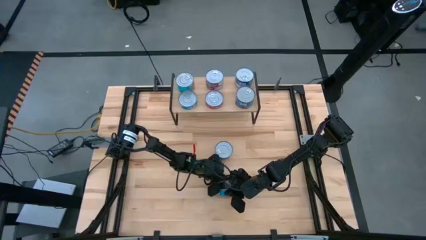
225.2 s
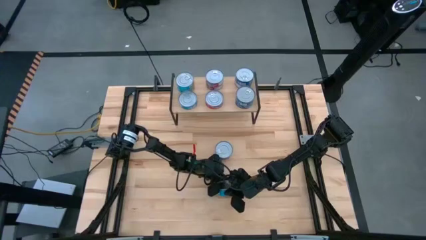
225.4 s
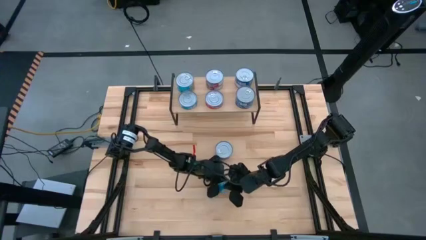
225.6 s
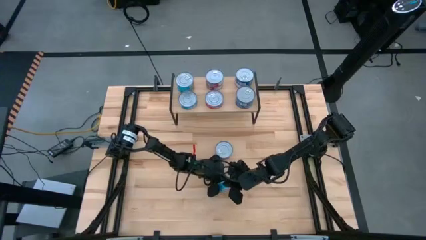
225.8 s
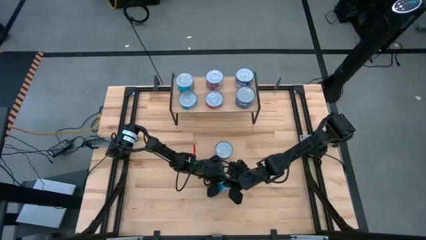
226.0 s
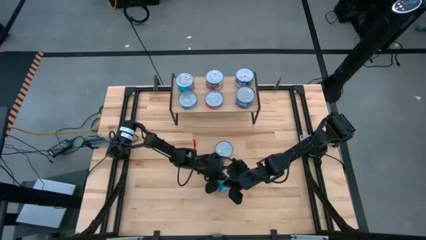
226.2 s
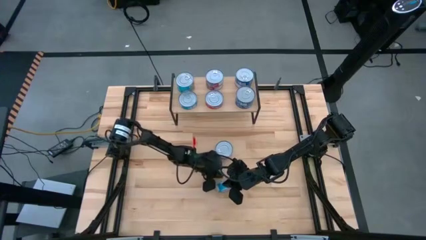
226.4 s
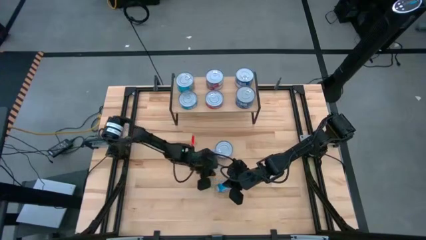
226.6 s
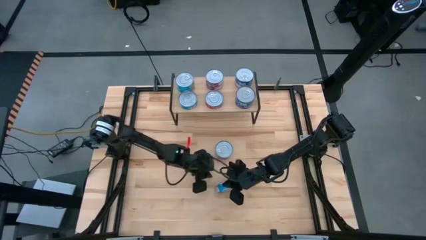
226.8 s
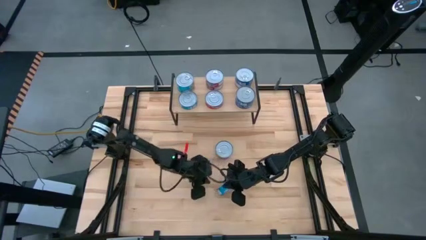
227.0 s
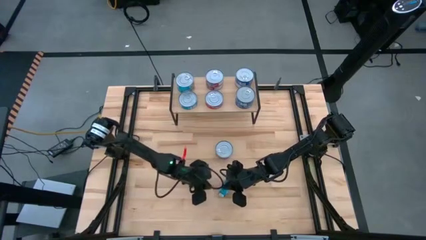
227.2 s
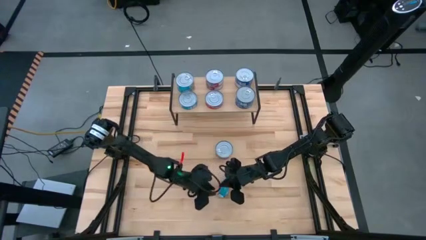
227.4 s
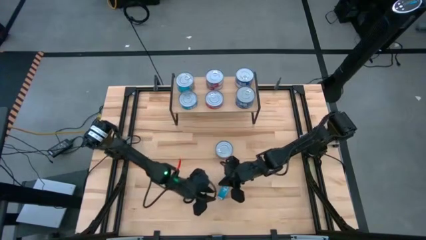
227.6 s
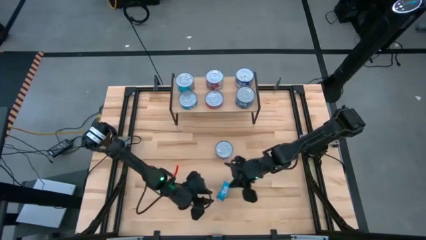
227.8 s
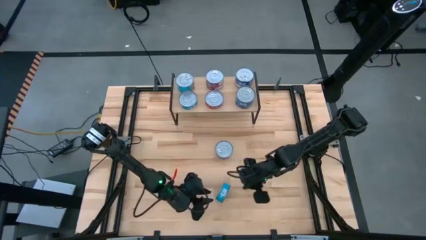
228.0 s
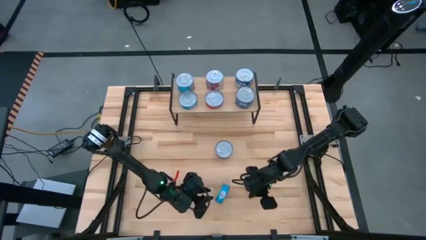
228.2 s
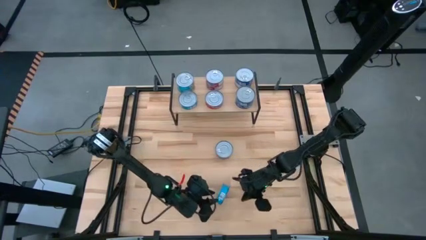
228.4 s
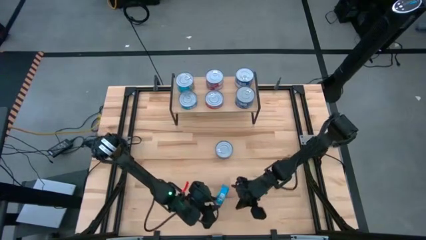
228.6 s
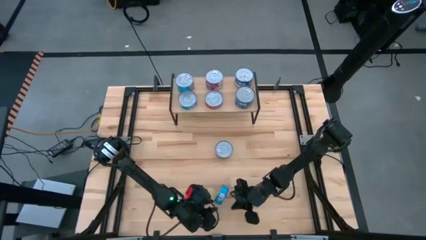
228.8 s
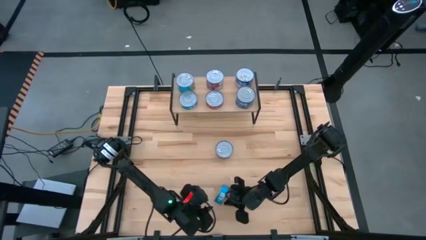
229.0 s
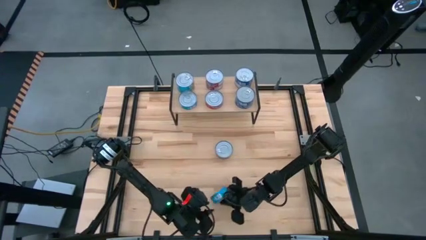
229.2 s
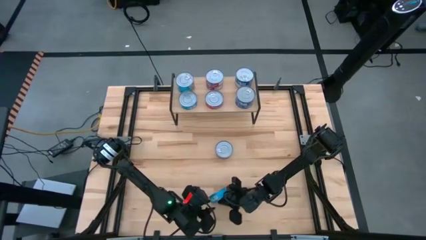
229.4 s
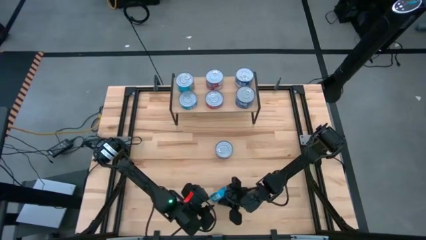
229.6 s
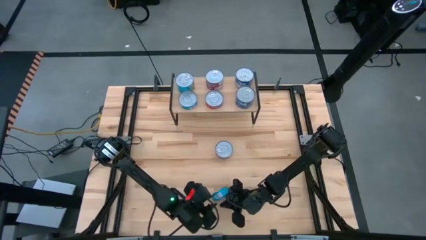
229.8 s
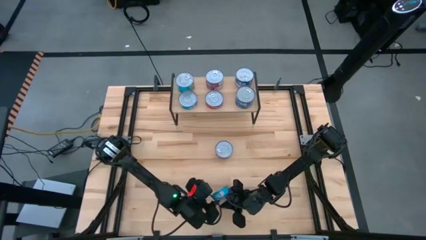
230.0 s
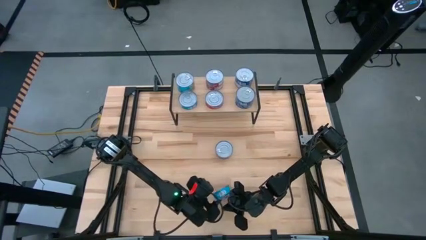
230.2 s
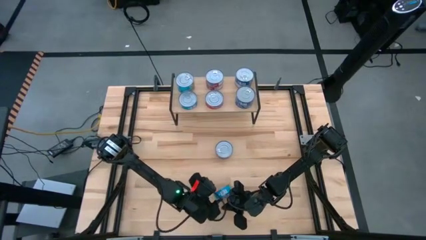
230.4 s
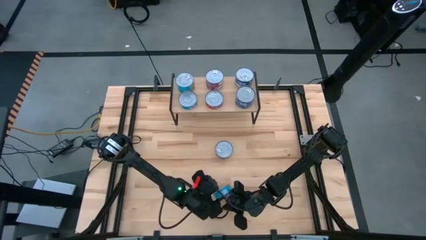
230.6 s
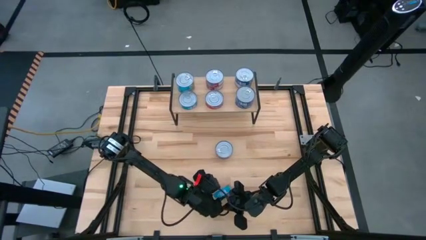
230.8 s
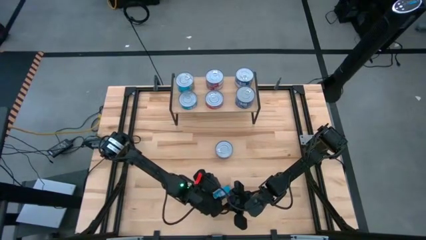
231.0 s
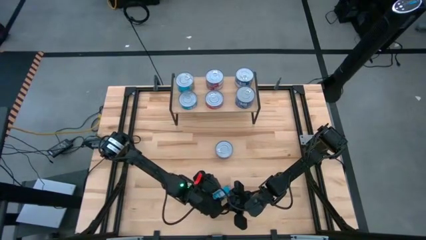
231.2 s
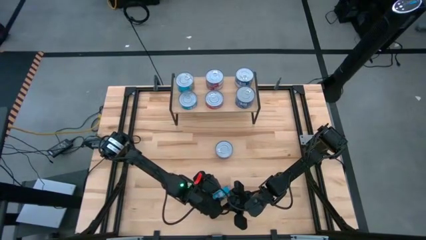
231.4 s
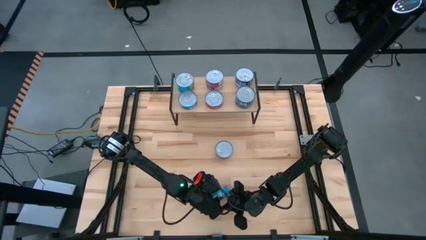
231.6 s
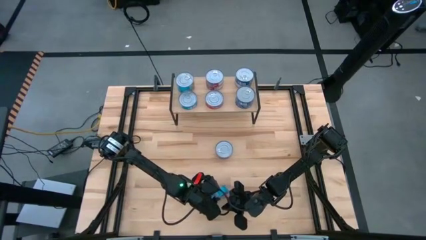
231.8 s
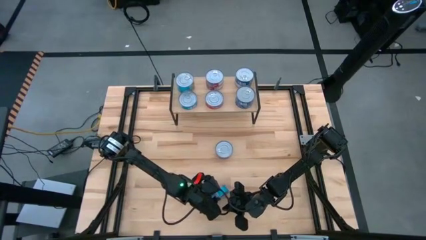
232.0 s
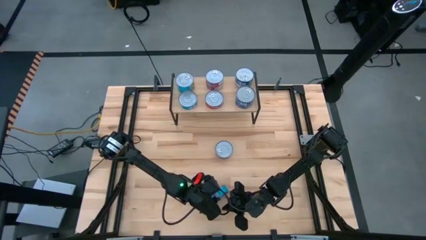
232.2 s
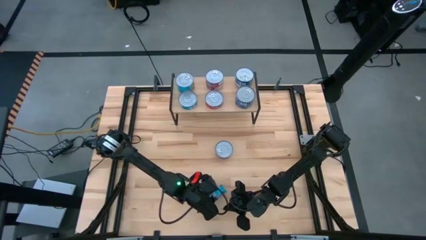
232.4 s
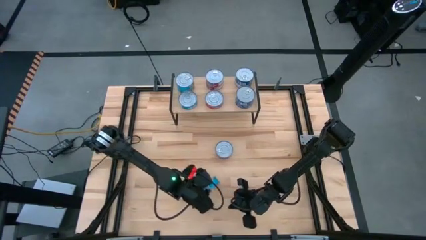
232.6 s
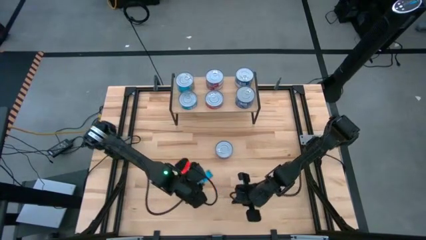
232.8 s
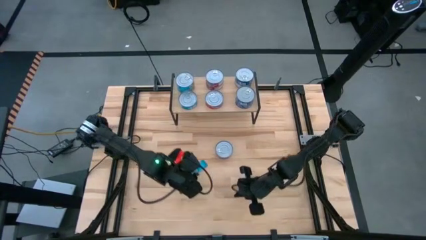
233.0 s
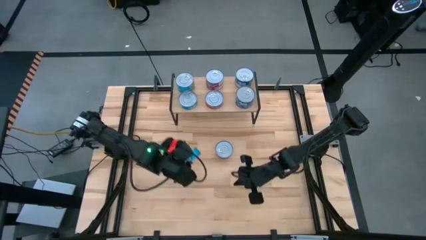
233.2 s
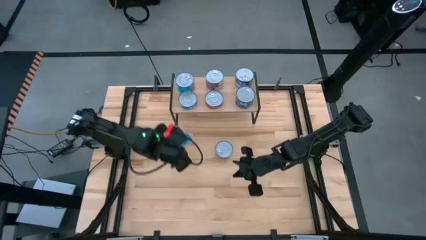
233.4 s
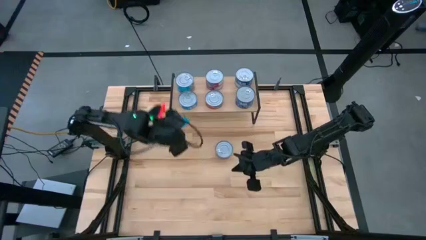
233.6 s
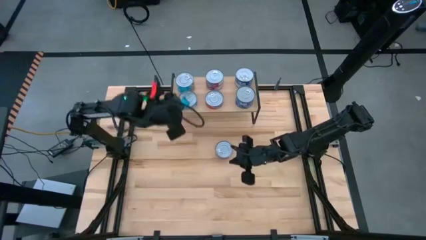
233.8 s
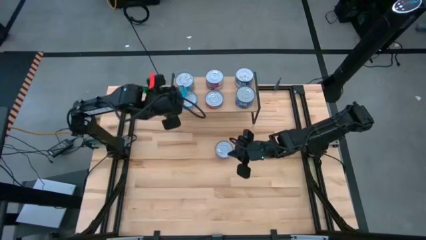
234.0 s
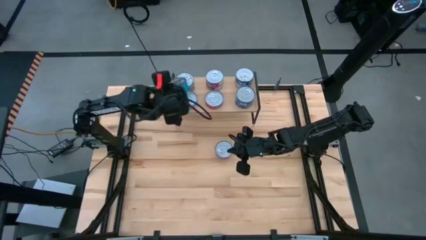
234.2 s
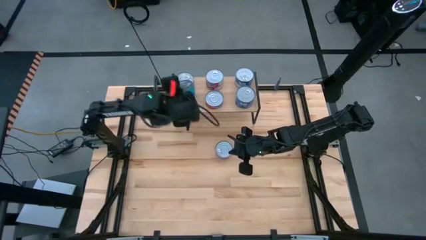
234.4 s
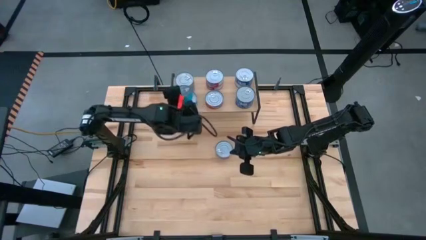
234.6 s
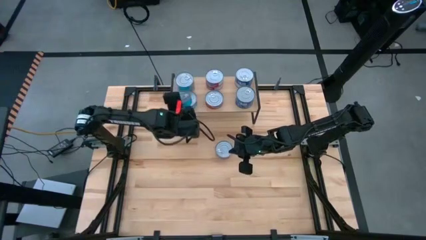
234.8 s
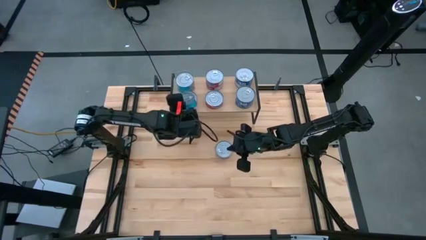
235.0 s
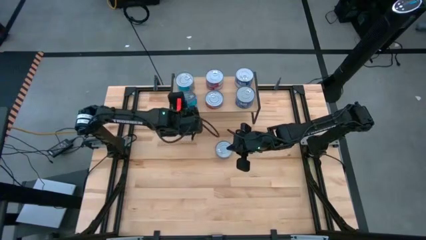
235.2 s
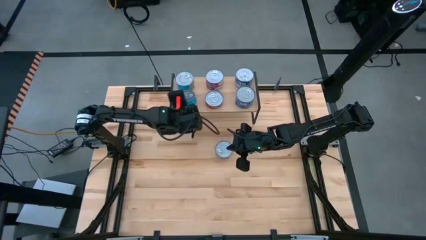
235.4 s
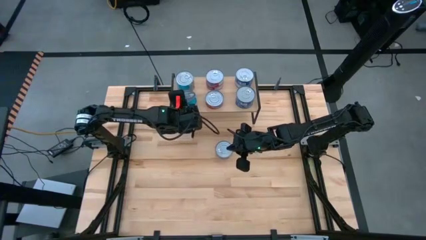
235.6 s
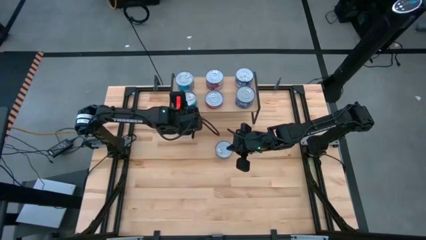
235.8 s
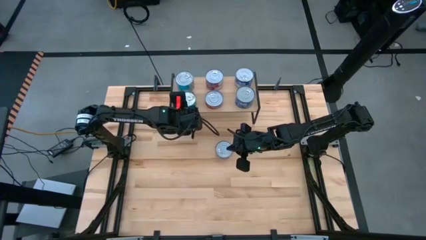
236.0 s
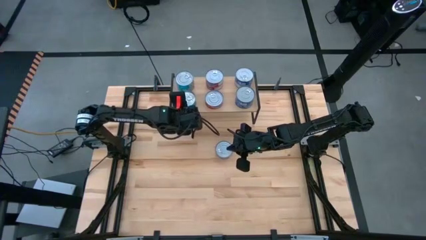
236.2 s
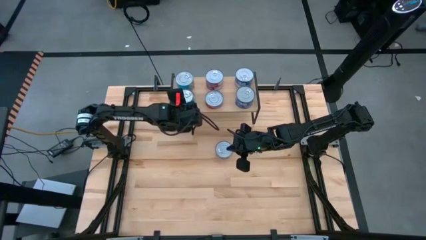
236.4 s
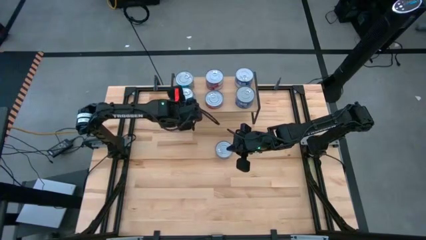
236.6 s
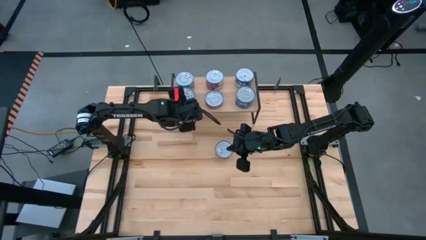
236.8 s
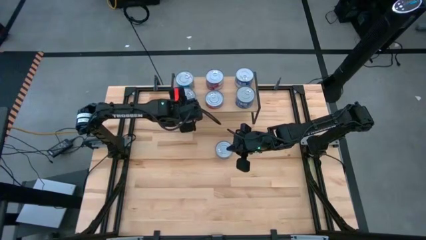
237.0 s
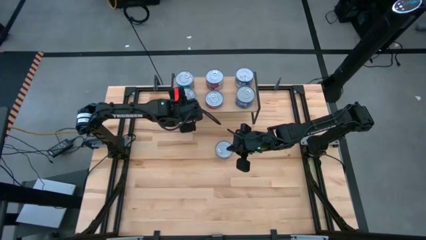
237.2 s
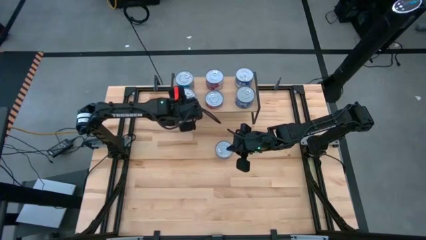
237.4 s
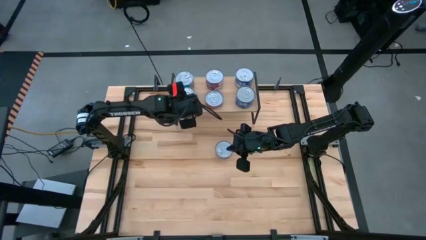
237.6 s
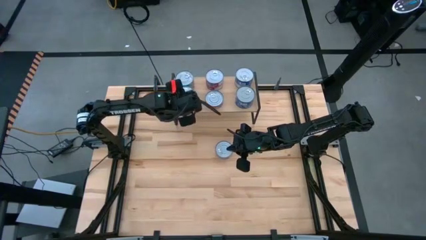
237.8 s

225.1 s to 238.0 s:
Task: Stack canned seafood by type on shelf
Stack the yellow and blue tuna can on top of the other yellow and blue tuna can

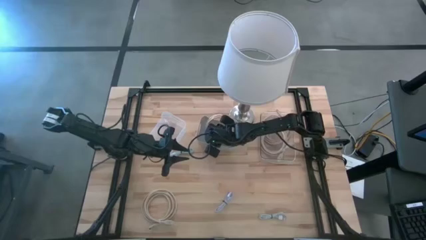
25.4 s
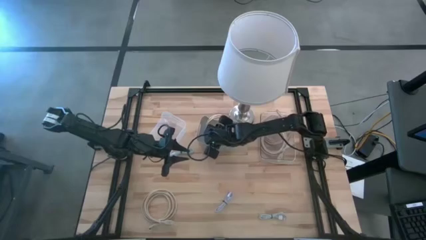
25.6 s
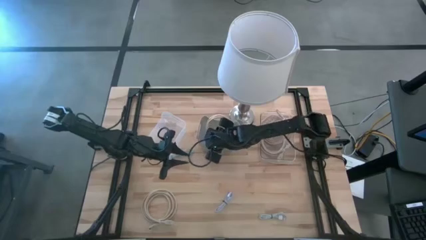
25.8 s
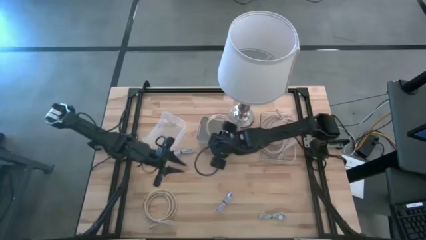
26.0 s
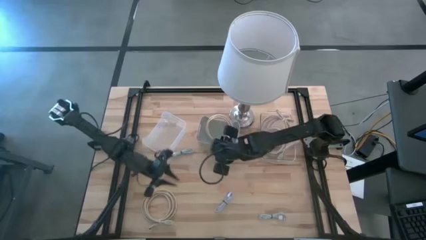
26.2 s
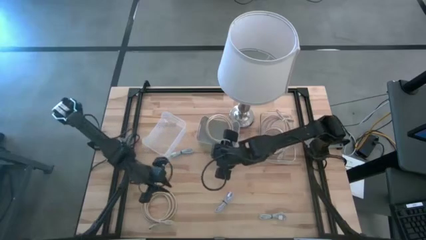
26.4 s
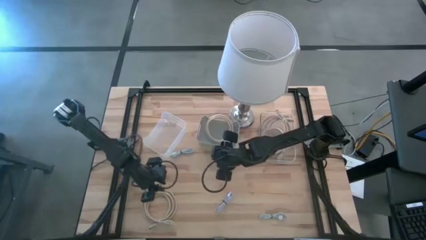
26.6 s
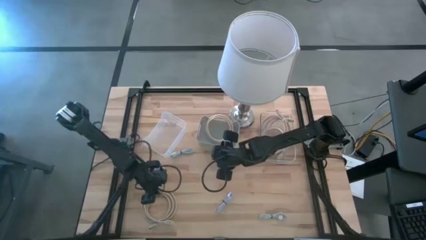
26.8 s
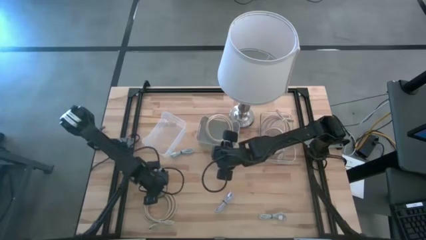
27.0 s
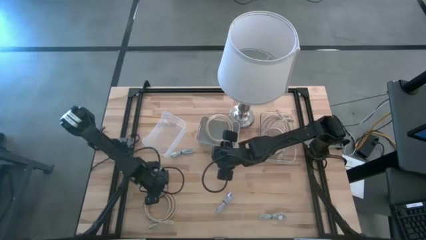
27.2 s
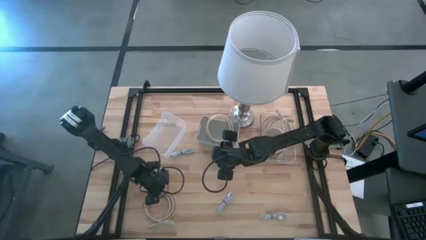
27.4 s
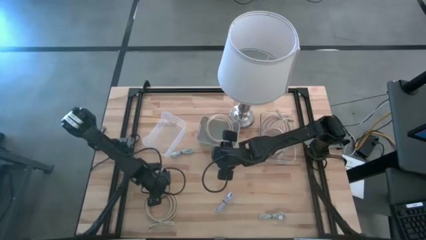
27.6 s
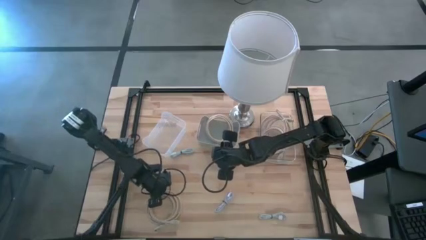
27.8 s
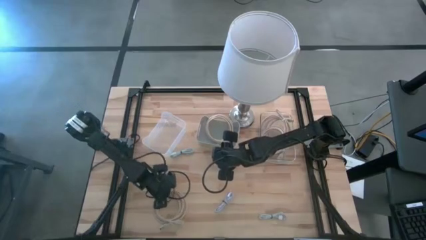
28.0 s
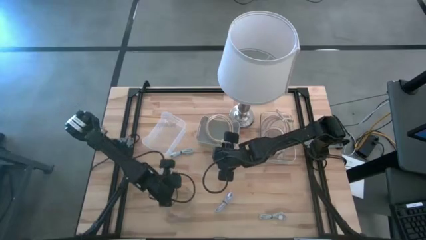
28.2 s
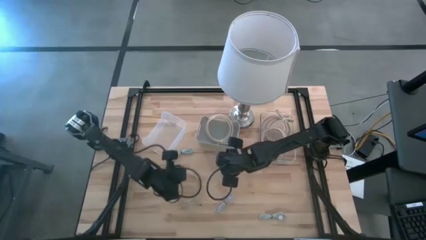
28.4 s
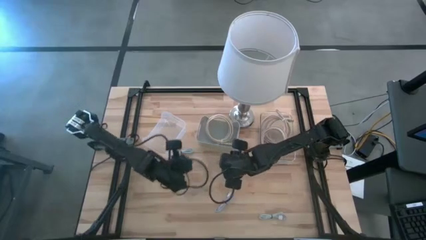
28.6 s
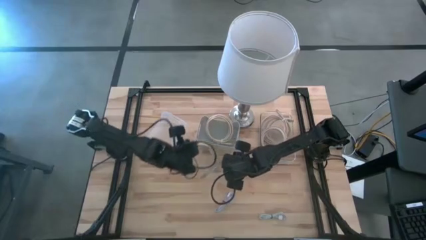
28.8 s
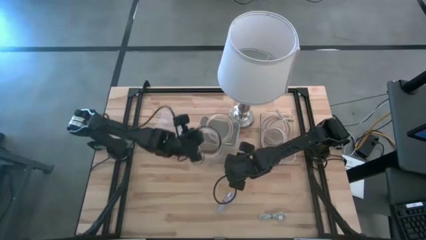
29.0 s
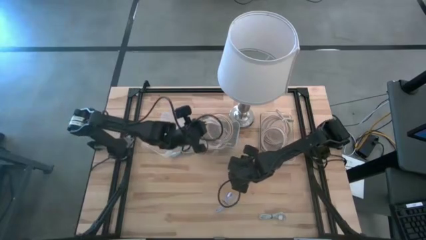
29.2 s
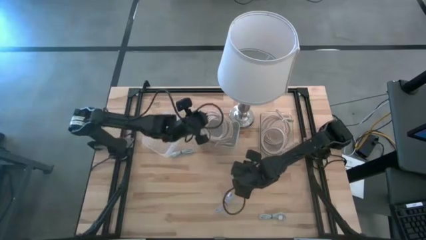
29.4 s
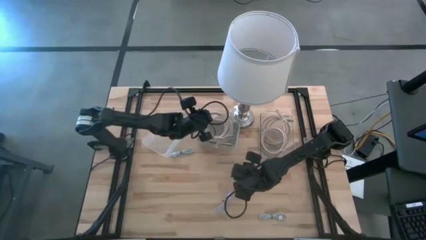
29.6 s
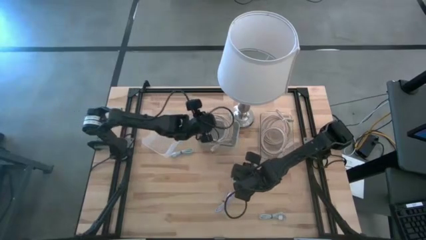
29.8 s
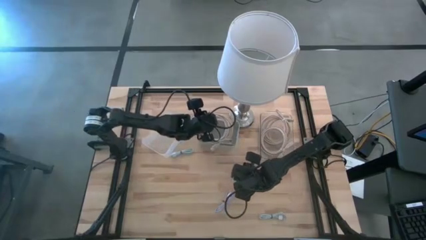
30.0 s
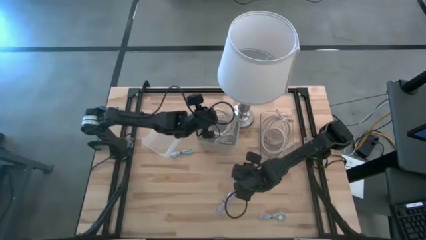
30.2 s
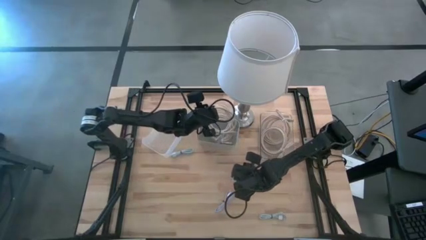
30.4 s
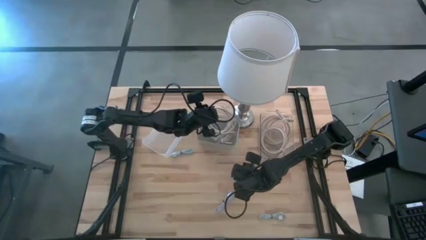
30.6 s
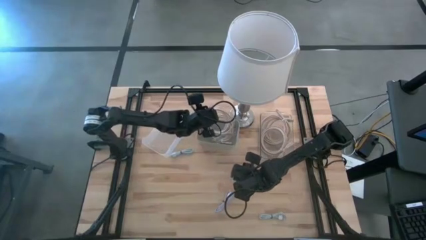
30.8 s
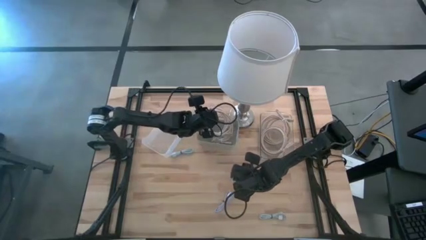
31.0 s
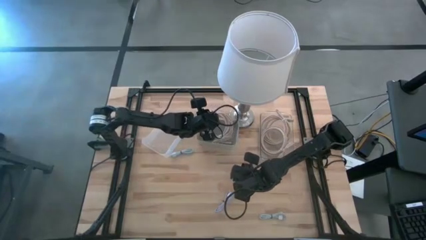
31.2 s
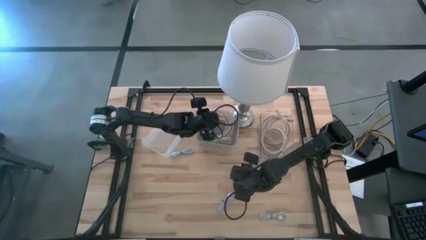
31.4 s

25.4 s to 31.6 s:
Task: Pick & Place USB Port
Put the light brown HDMI cable into the gray bin
